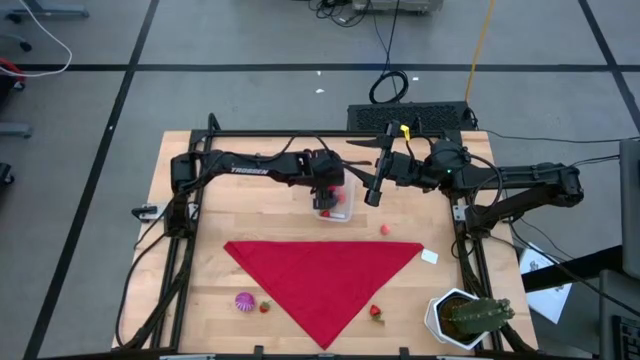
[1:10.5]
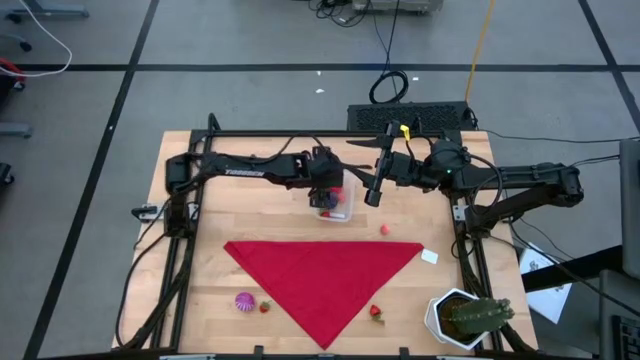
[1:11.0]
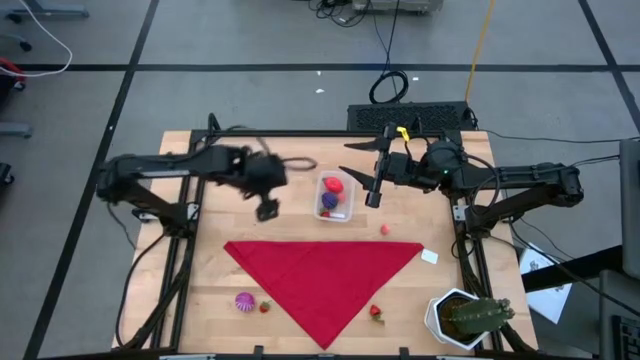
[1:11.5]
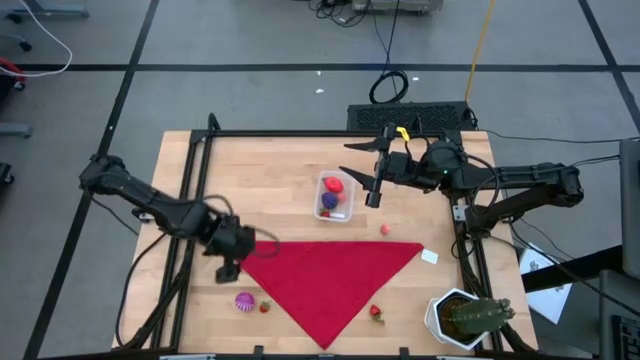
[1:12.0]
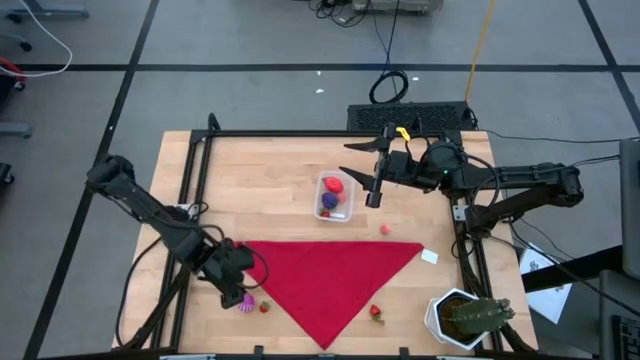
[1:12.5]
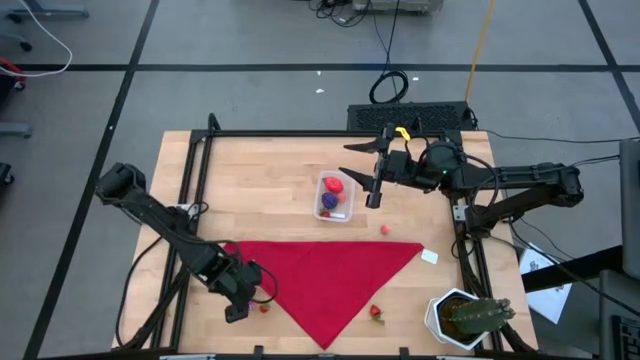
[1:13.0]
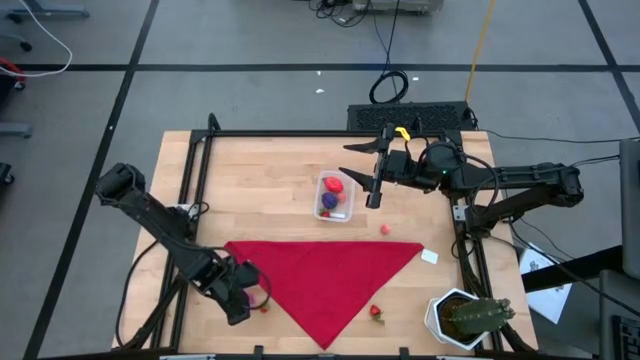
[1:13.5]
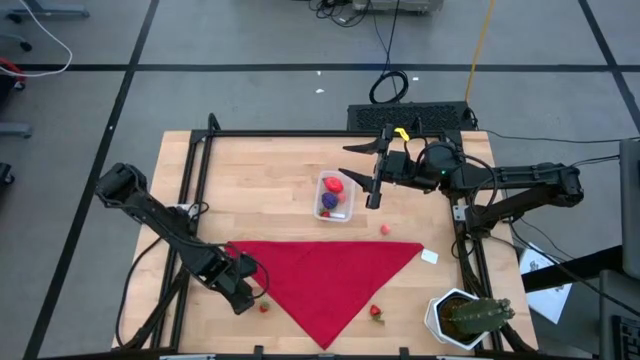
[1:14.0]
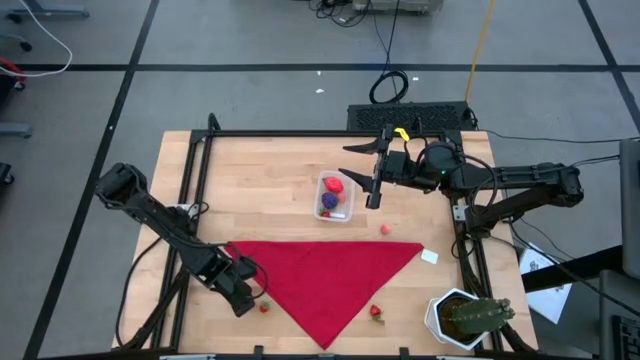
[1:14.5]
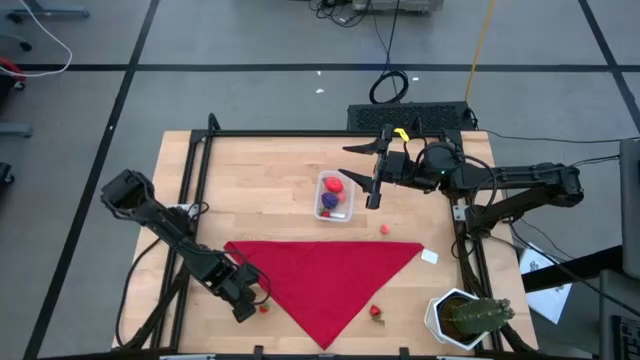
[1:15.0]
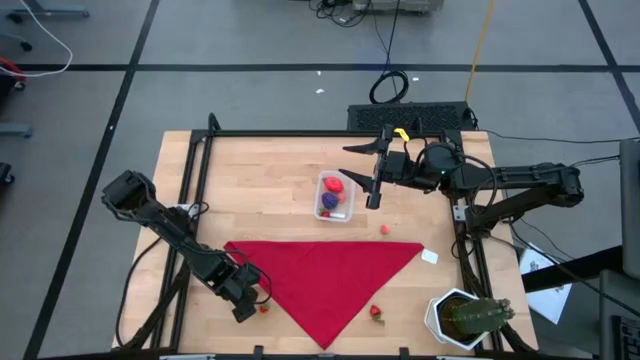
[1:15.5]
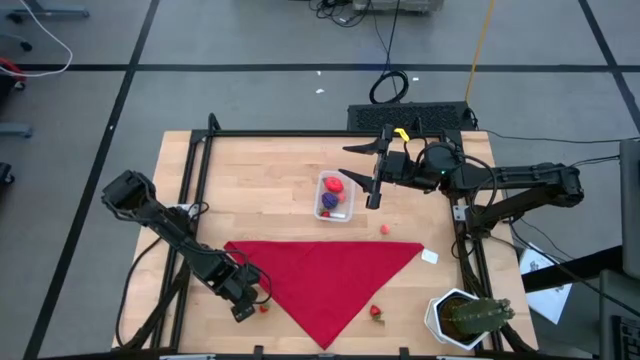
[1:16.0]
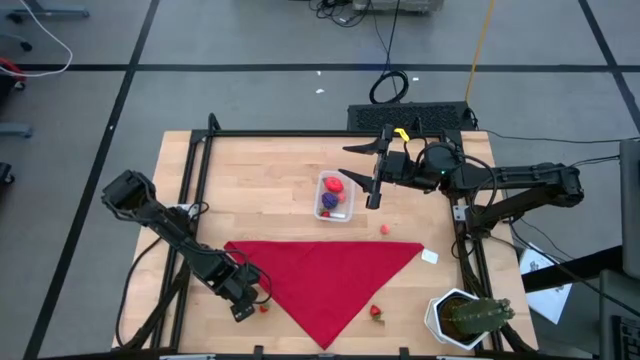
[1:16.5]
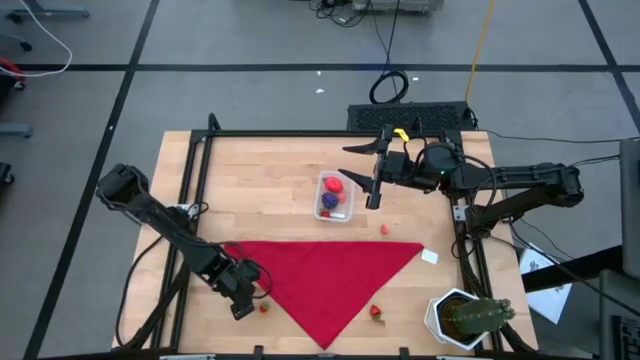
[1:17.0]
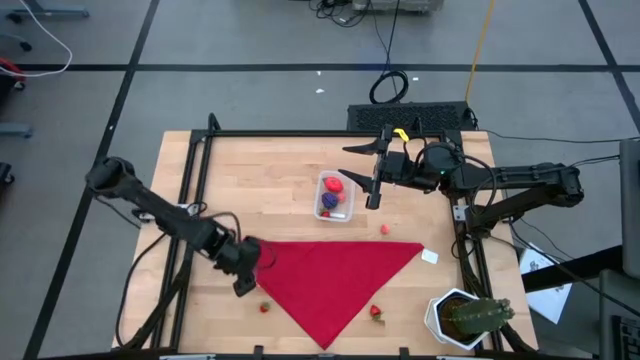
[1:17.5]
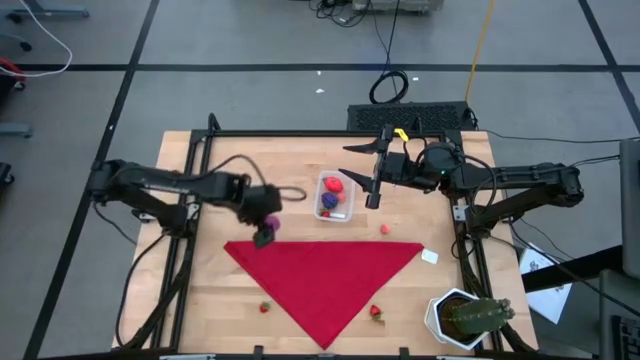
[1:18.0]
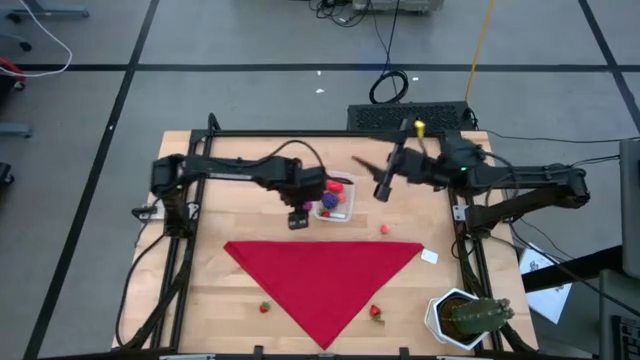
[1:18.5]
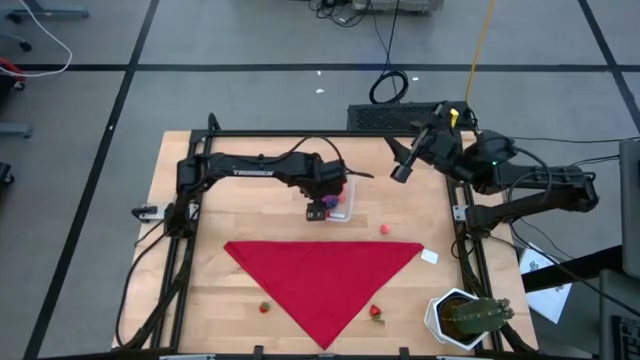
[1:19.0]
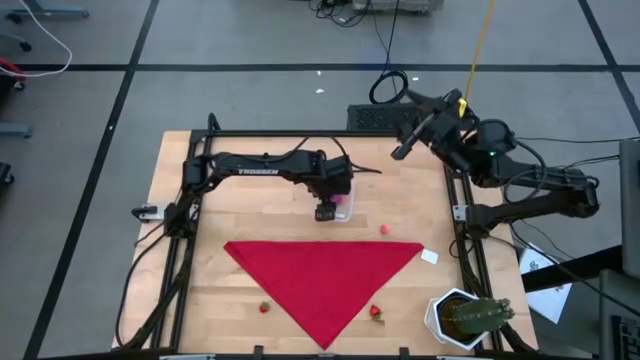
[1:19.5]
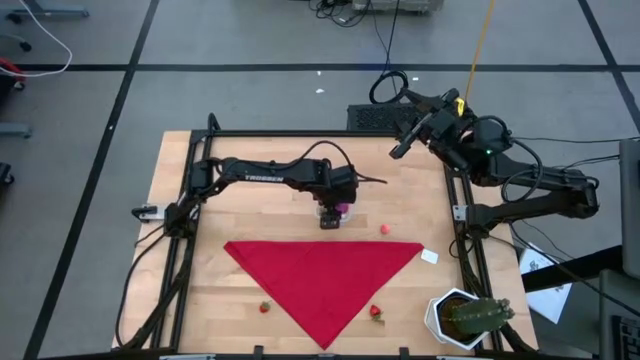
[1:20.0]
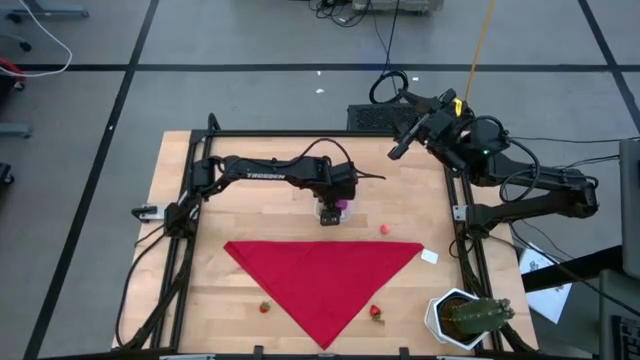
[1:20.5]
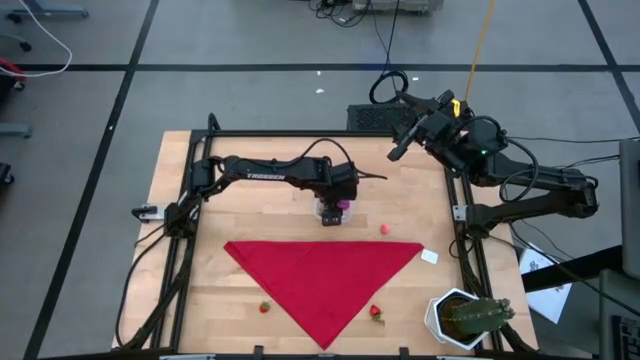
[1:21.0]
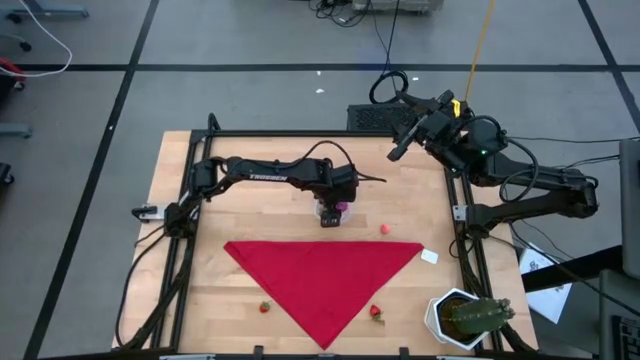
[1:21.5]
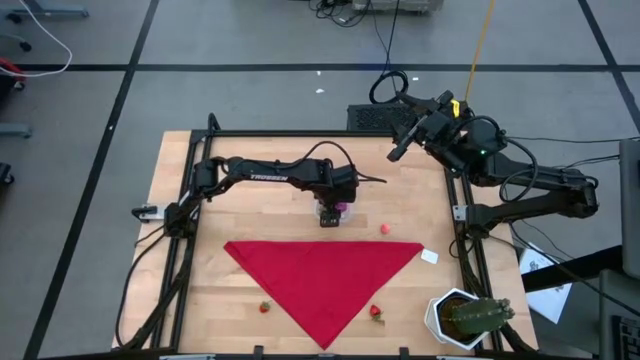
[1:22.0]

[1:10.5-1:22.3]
Task: Pick and placing Produce into tupperware
Put the purple onion into the transparent bin

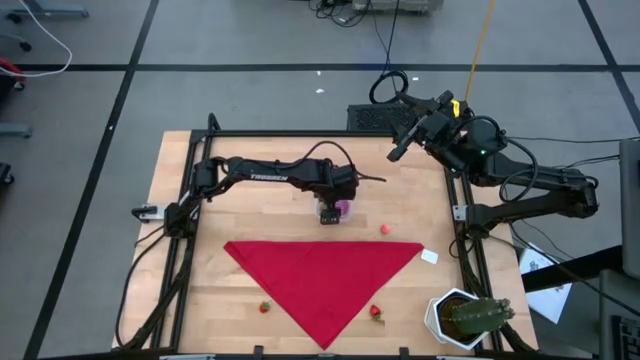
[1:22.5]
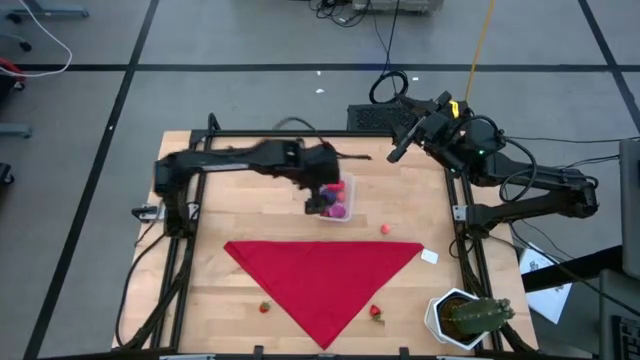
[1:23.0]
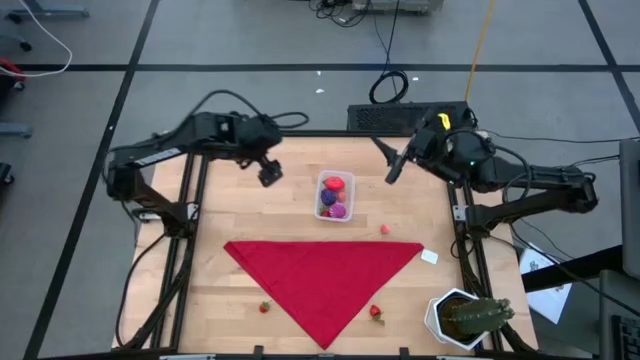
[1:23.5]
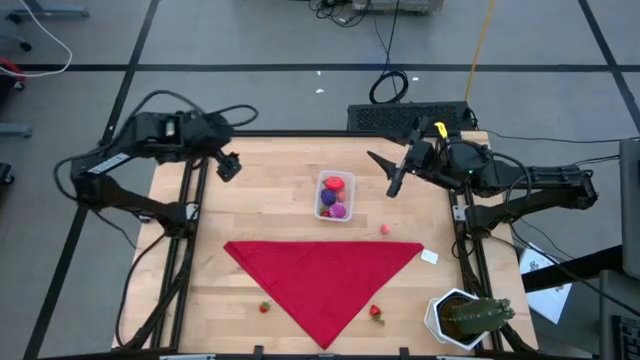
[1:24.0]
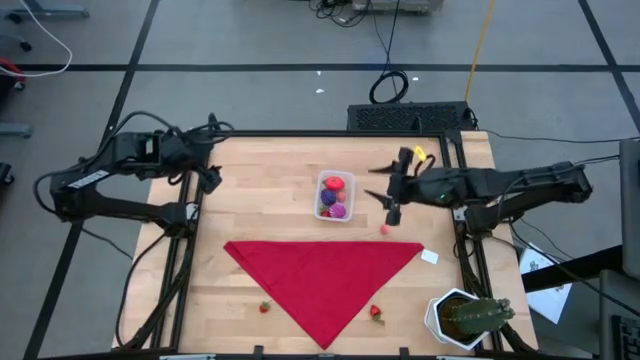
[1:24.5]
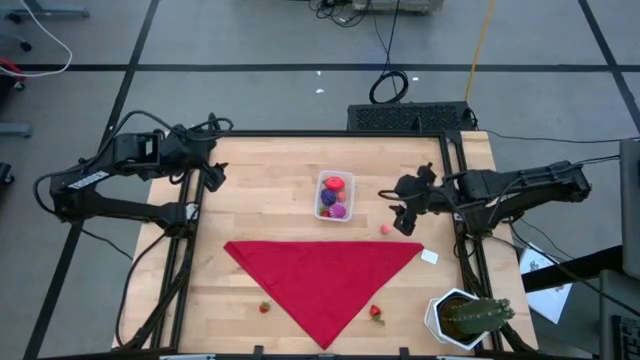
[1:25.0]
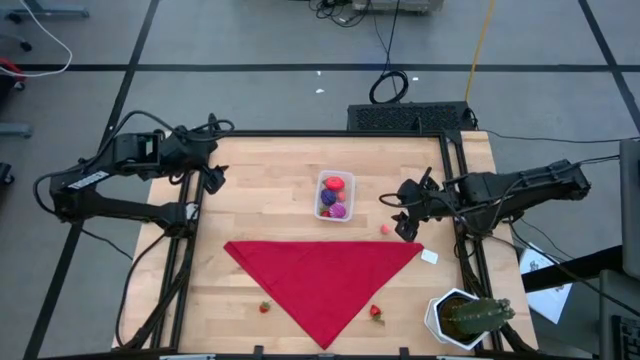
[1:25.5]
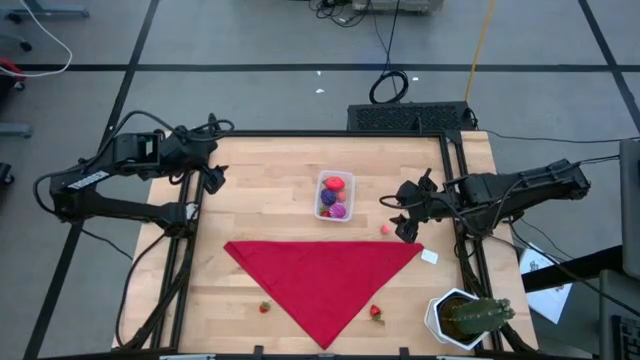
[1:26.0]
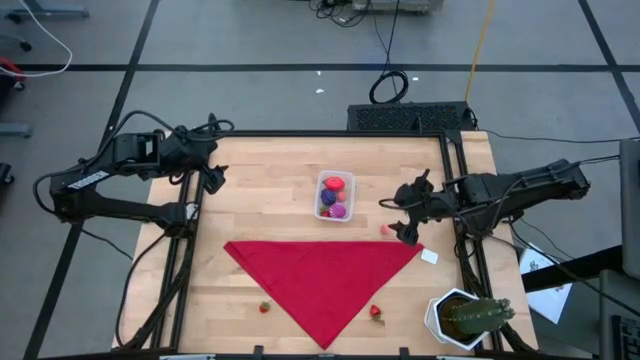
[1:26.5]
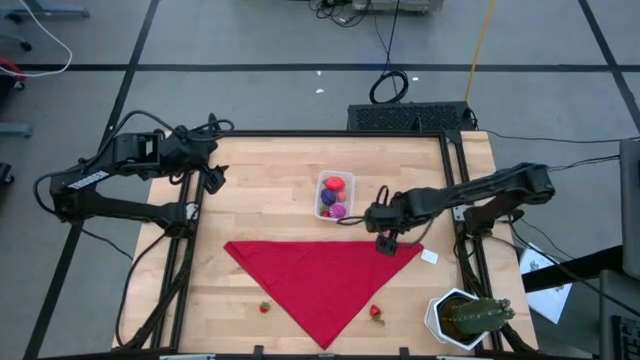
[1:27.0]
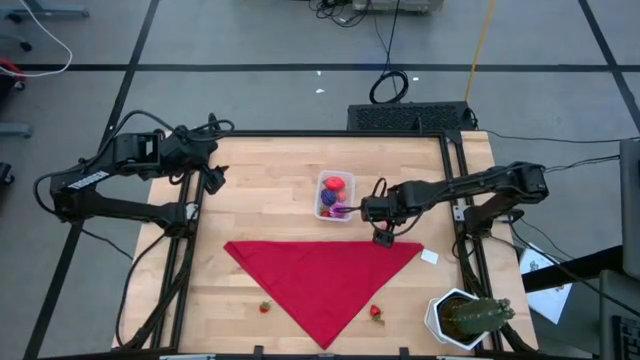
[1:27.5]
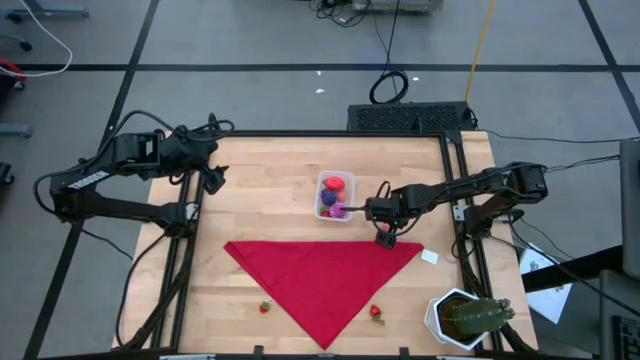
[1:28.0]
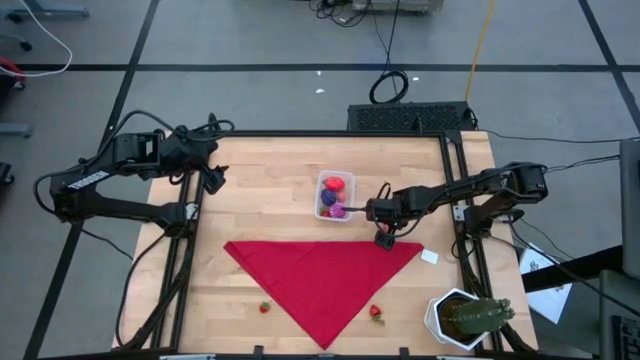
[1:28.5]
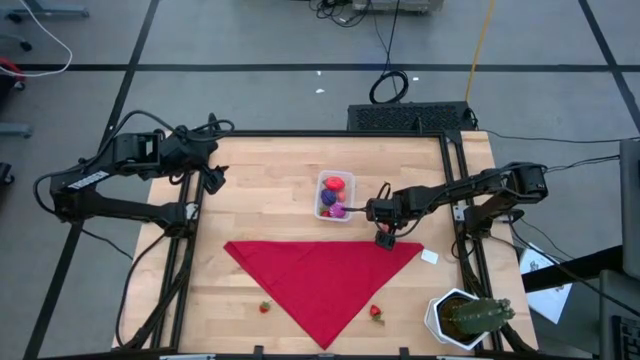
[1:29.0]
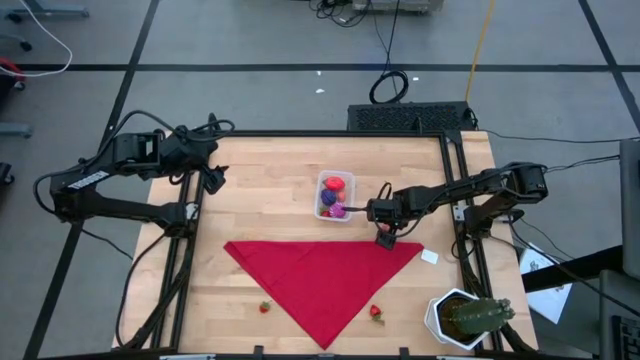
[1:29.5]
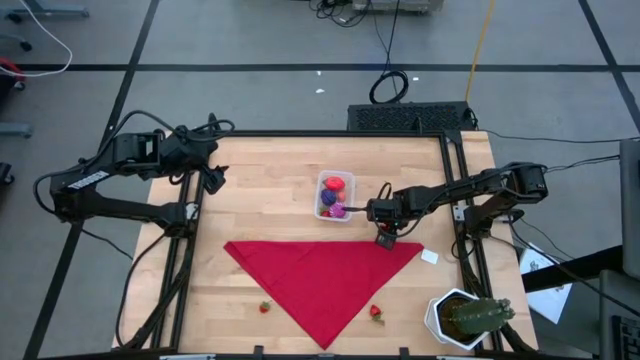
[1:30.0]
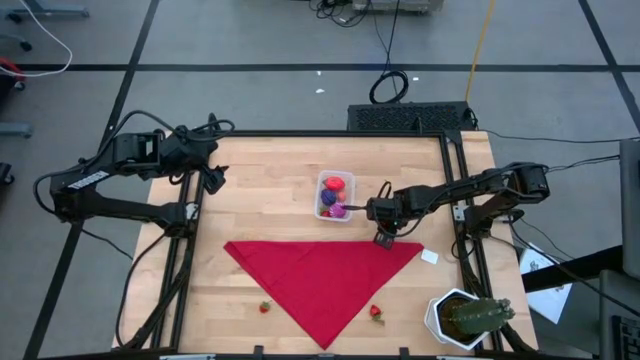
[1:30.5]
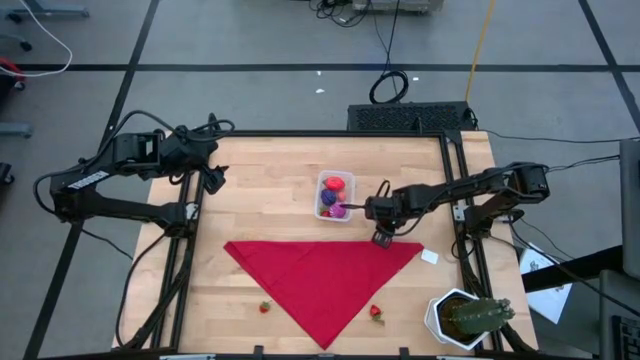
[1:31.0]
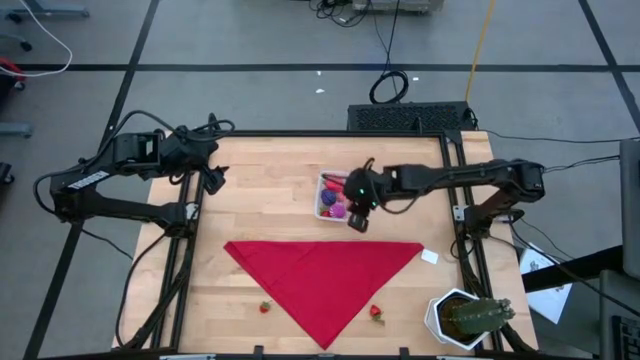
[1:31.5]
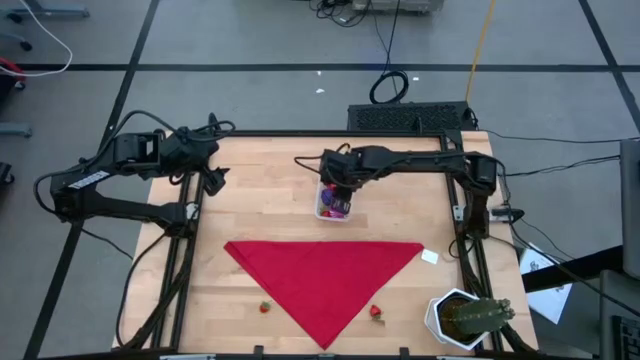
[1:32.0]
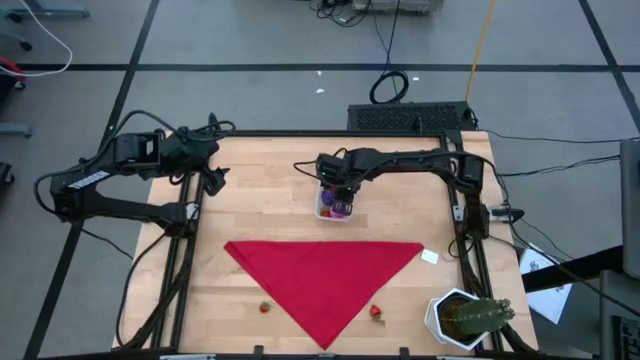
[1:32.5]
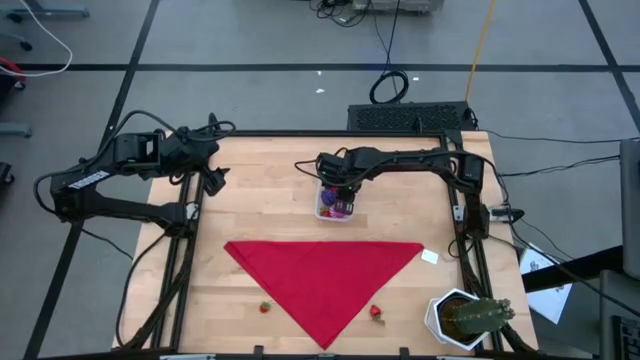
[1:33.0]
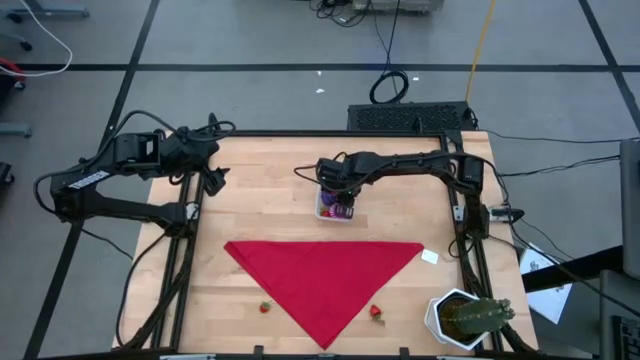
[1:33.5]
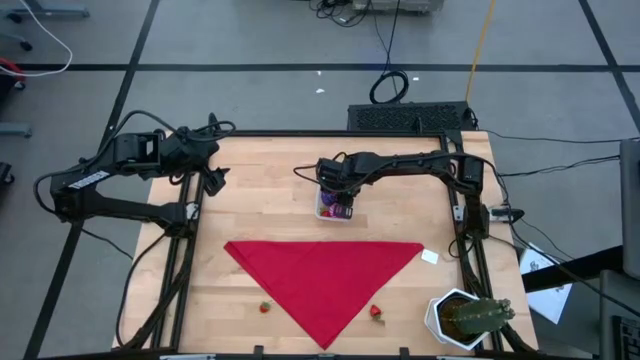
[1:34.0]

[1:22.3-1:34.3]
Put the pink peach into the transparent bin
